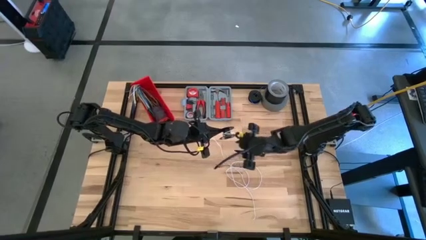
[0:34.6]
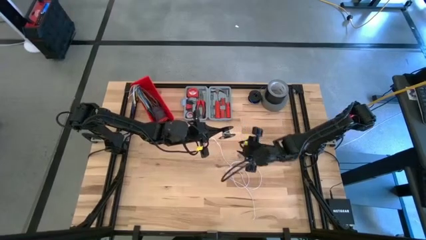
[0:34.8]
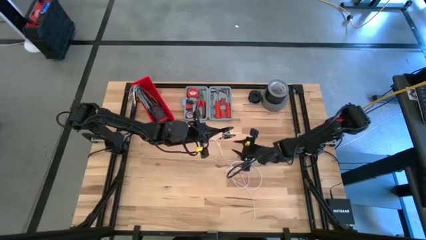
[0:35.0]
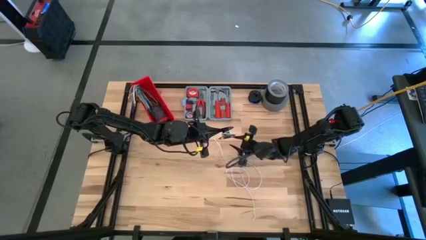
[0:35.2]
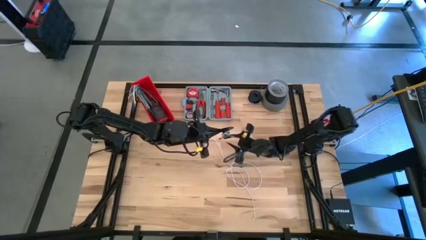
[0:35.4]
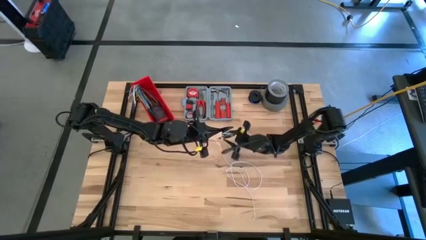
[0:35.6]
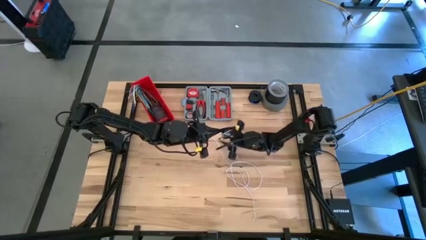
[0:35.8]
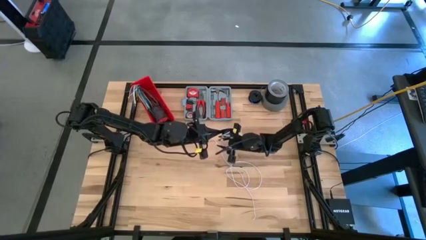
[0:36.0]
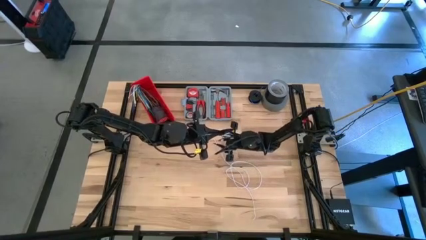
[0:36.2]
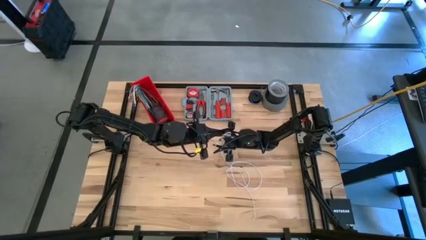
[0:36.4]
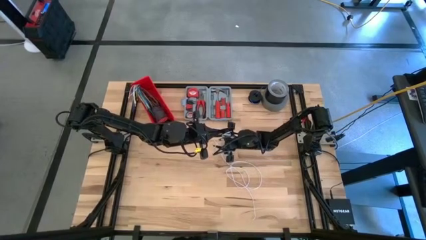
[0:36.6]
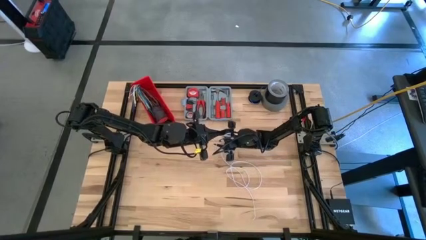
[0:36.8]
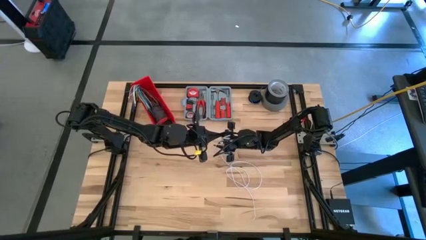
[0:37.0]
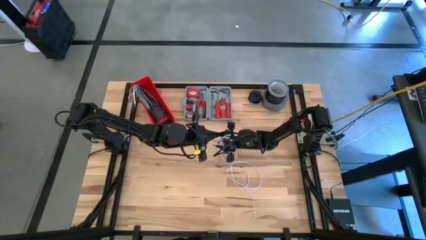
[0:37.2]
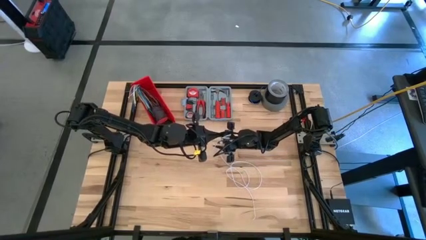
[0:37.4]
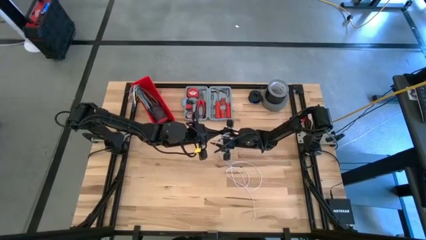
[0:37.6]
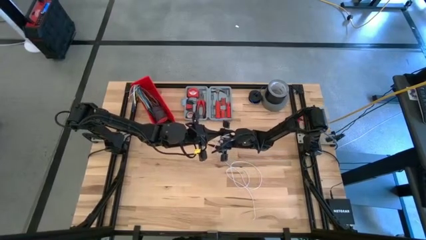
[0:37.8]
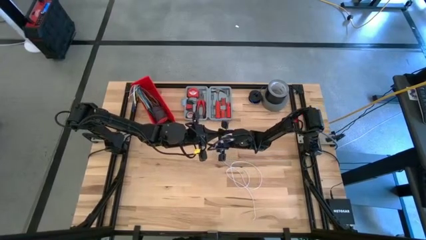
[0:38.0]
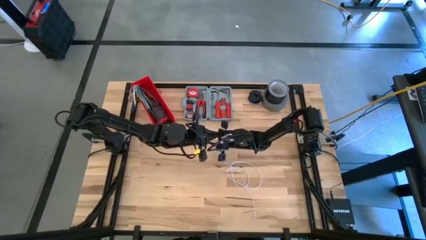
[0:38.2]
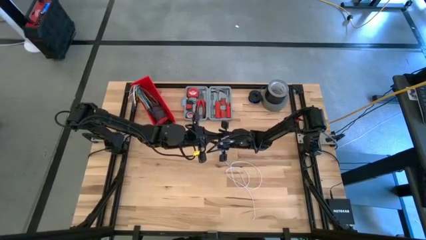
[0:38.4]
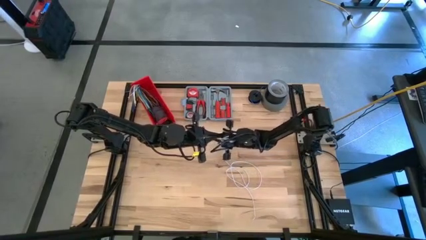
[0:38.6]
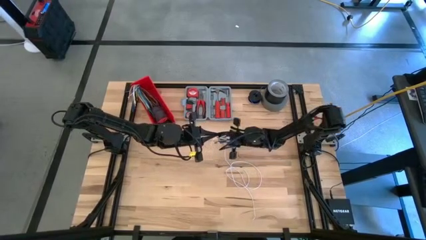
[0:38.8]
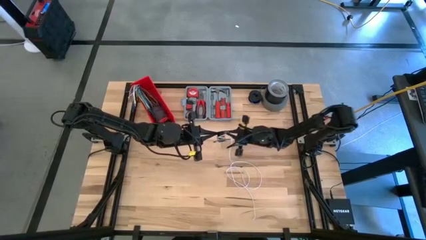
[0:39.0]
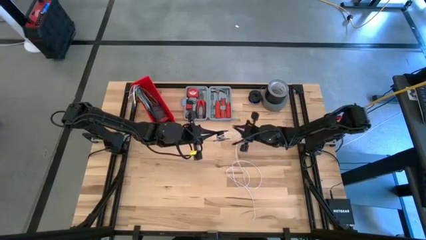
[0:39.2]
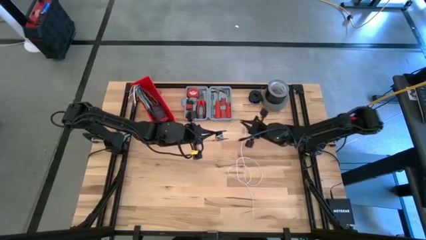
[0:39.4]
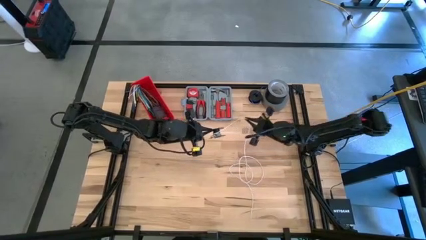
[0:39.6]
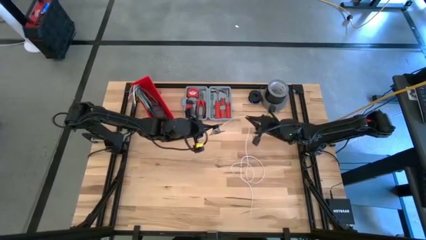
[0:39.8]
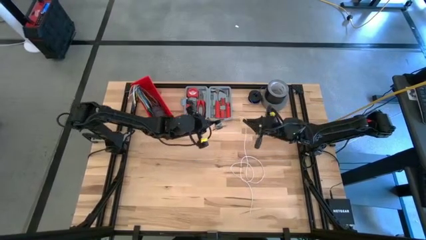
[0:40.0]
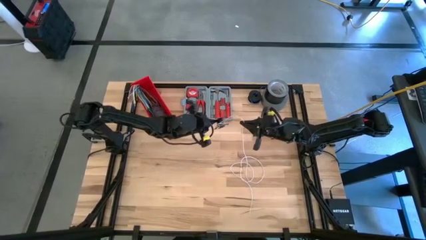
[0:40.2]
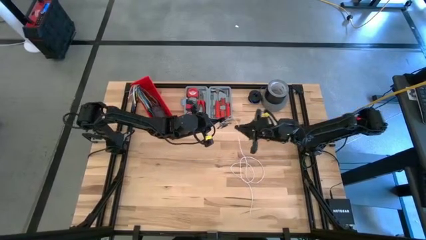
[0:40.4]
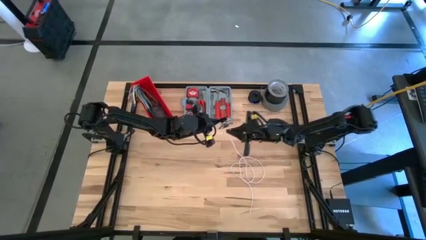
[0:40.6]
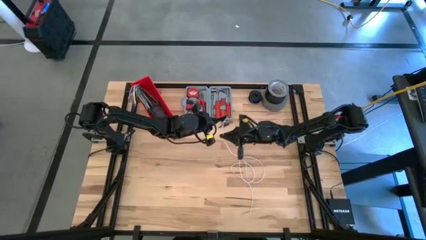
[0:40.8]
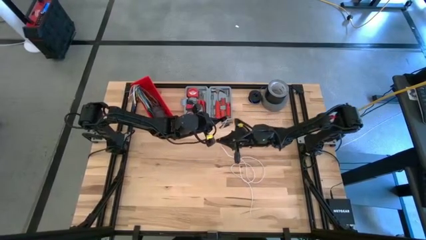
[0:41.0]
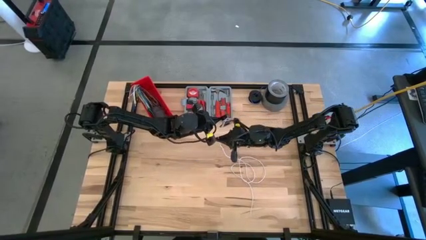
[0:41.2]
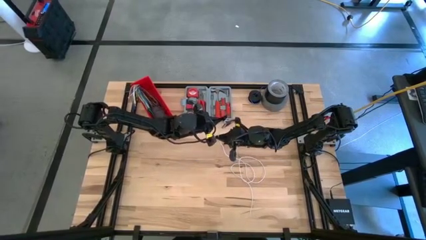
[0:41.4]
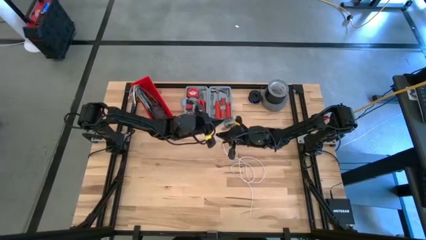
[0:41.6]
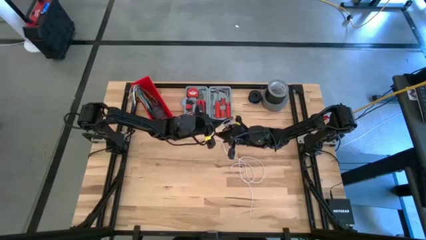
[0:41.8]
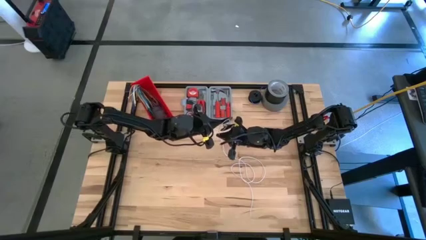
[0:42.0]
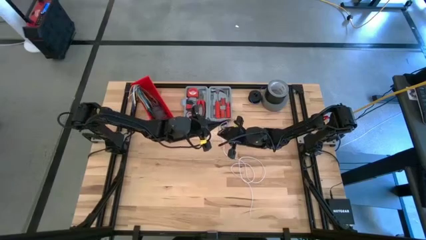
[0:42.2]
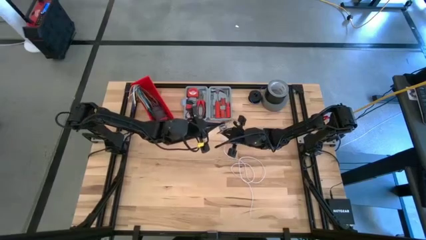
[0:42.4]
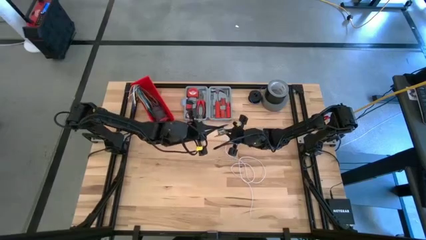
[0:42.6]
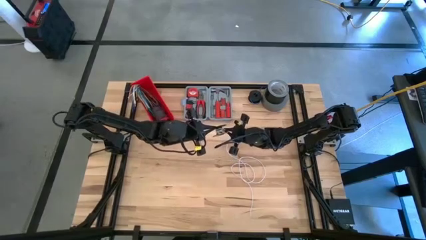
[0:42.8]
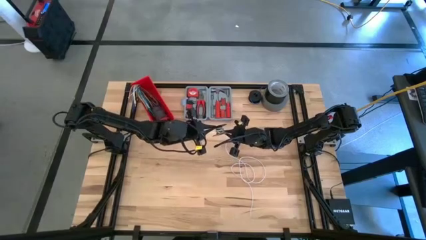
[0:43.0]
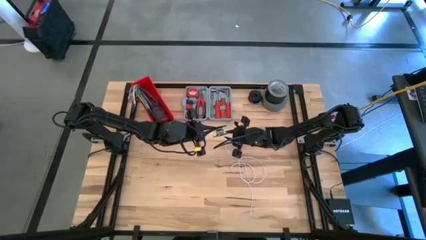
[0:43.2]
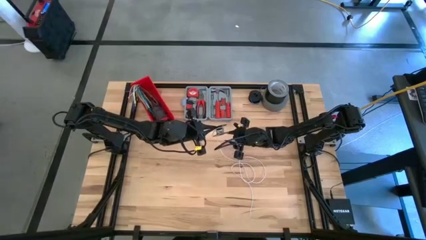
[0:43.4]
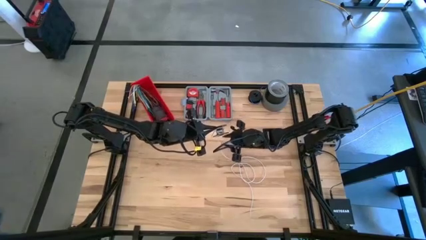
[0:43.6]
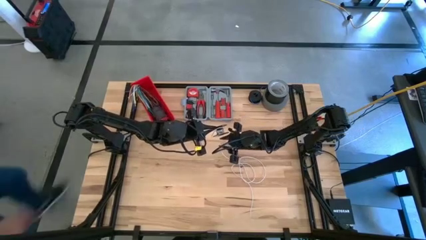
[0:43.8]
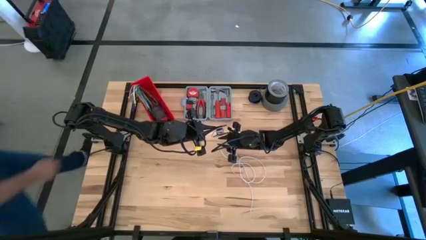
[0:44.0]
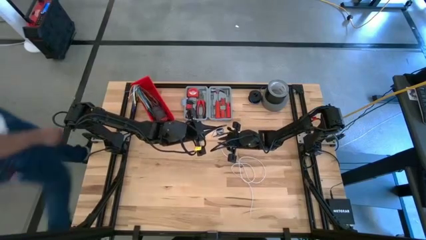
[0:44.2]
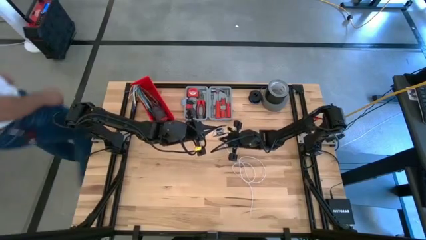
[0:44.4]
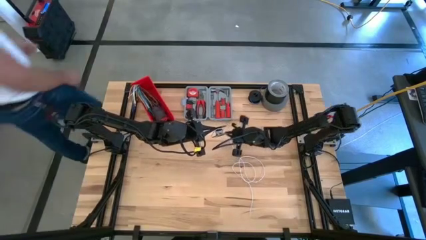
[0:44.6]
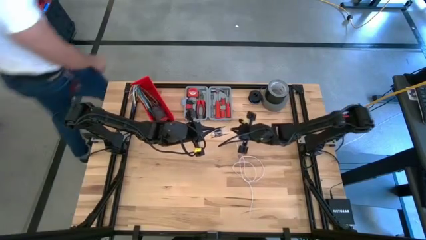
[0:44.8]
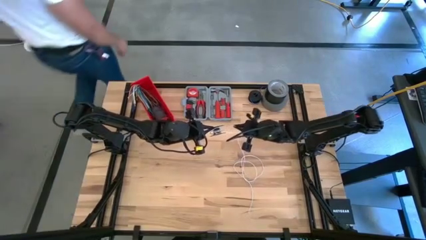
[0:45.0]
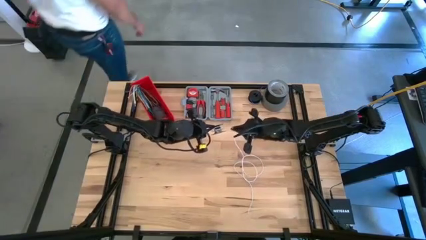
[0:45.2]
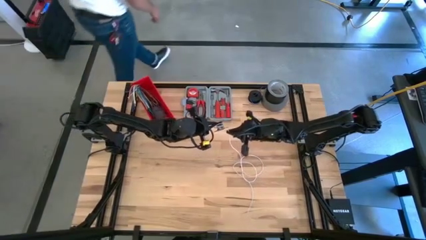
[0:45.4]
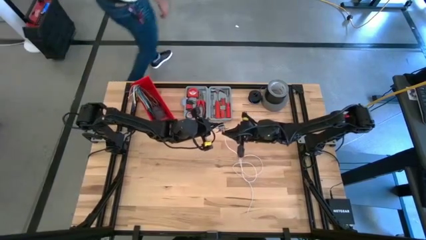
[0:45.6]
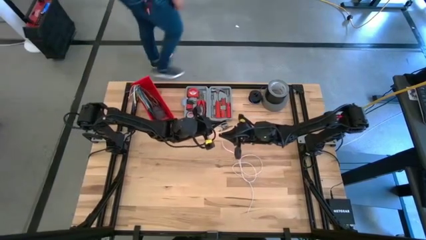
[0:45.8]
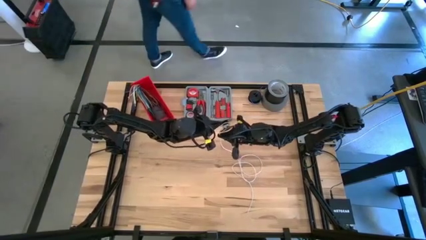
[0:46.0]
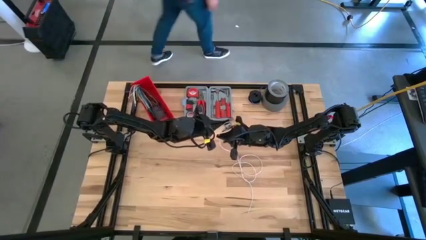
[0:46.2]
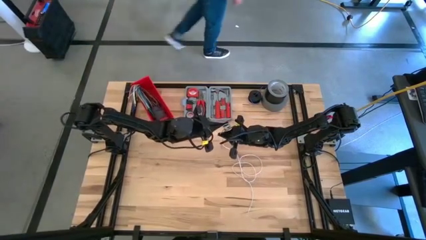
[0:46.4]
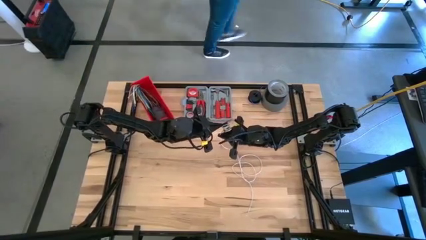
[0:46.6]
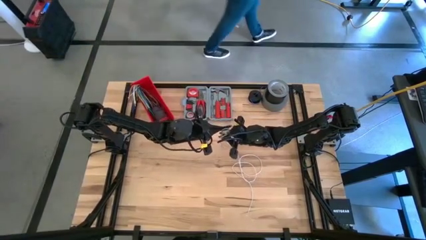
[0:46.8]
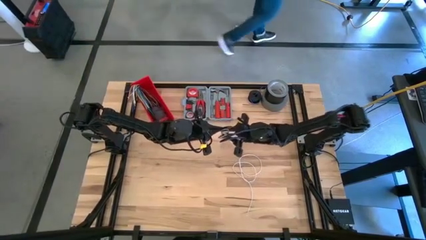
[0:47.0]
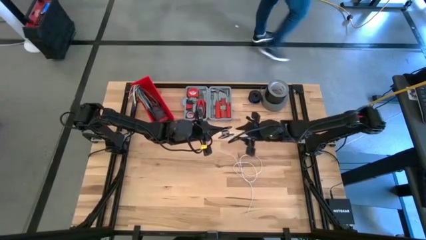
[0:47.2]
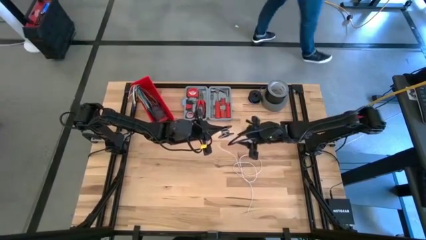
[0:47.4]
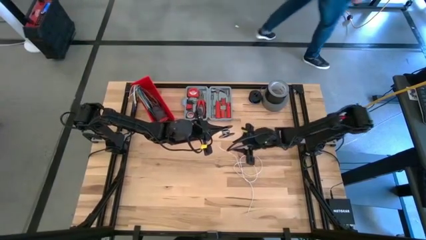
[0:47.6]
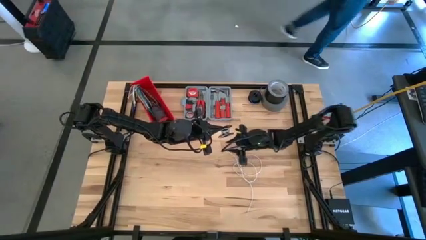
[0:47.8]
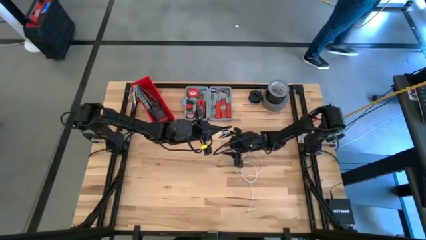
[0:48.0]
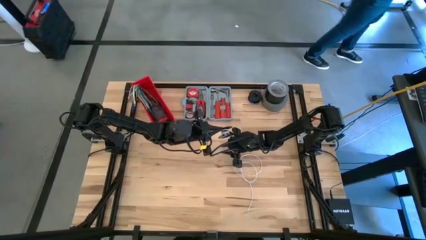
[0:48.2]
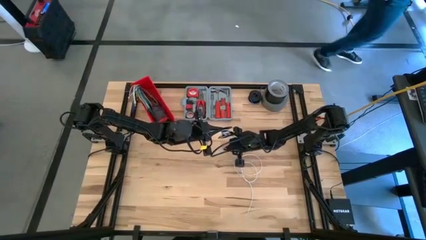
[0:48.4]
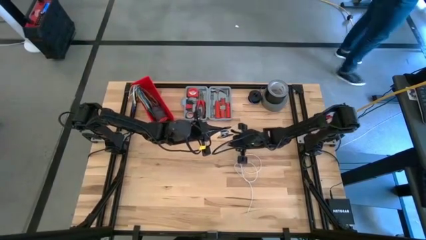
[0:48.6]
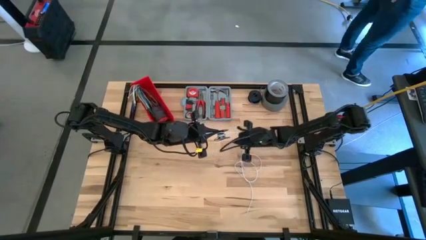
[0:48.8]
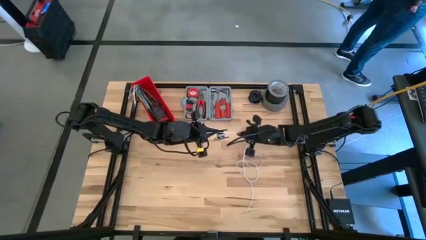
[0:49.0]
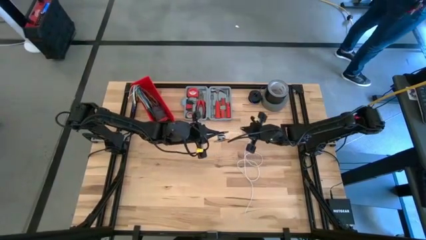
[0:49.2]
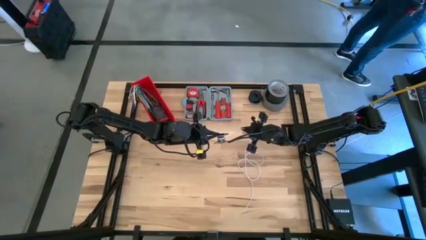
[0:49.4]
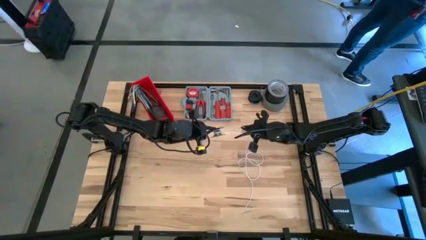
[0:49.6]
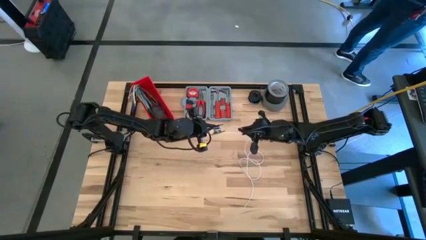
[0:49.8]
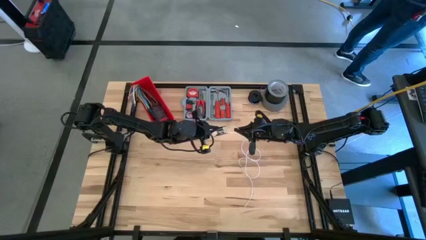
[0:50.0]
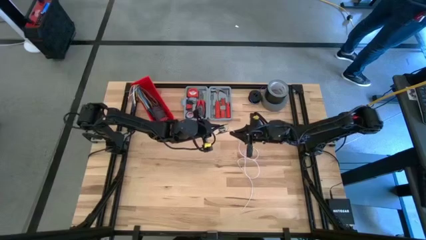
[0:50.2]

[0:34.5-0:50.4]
Task: Coil cords
Coil the white wire into the spool
